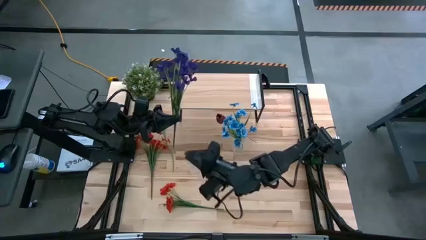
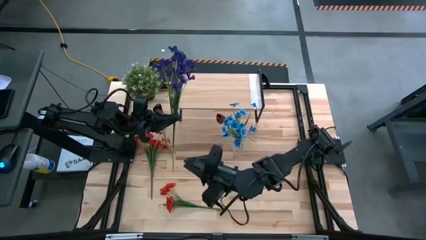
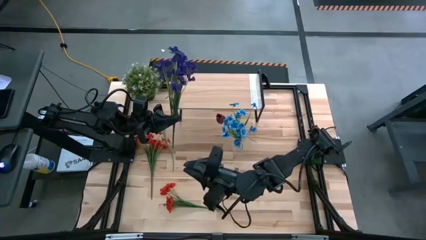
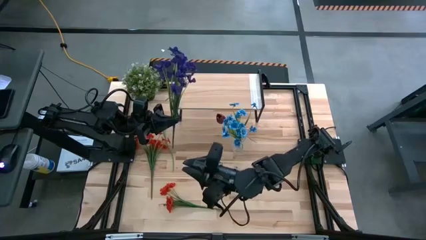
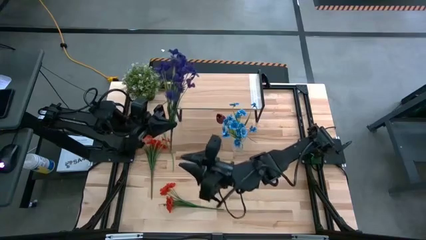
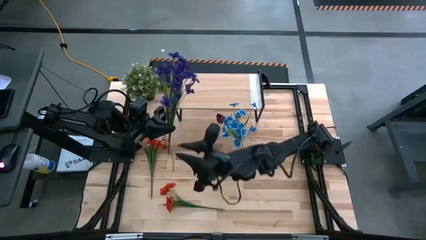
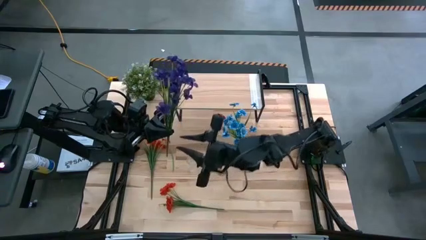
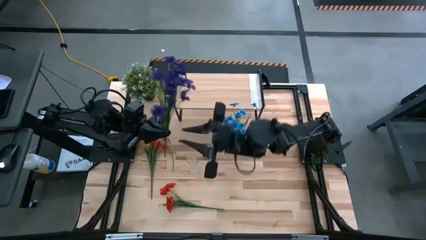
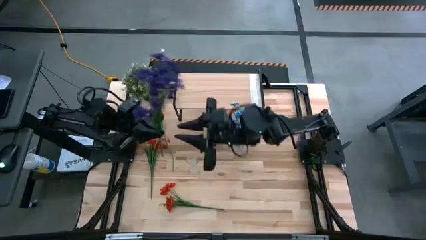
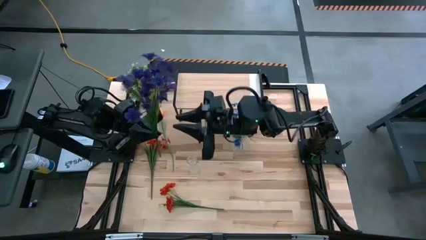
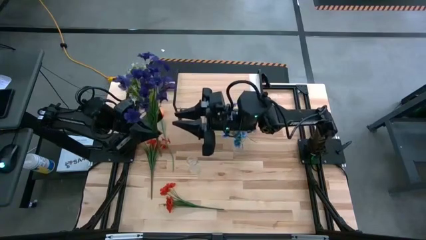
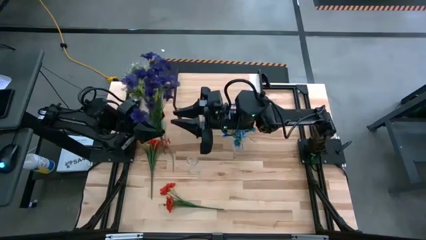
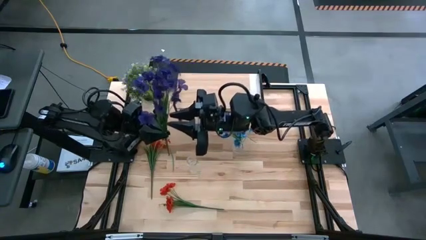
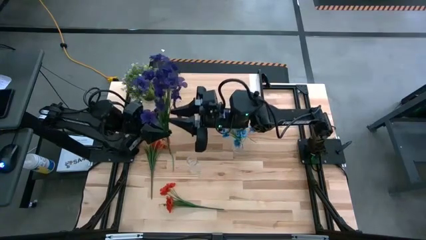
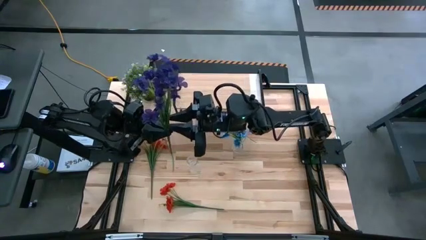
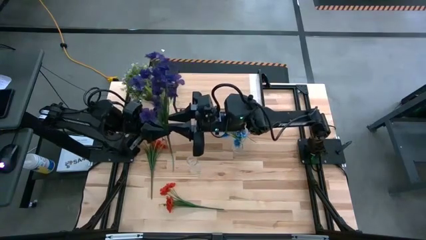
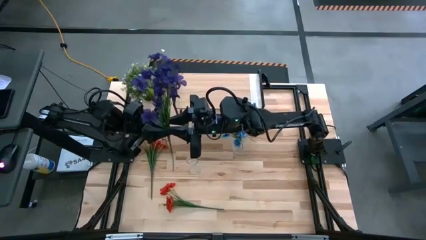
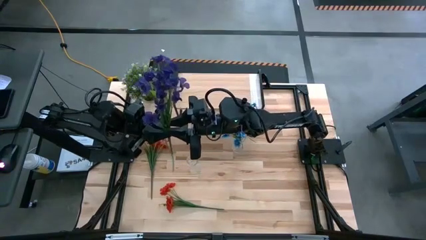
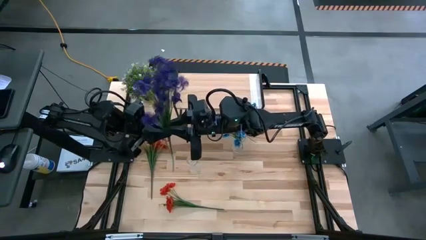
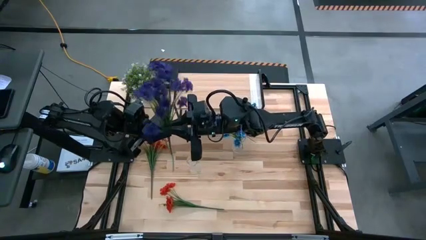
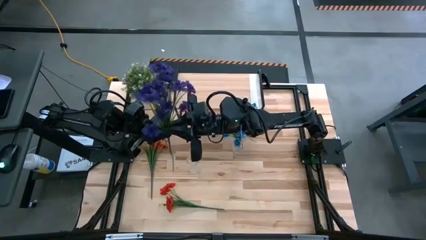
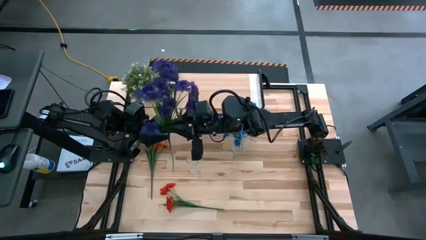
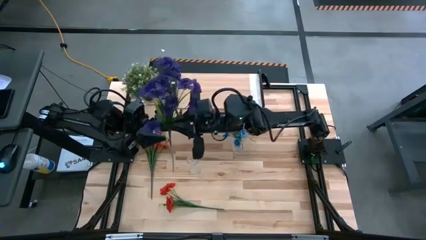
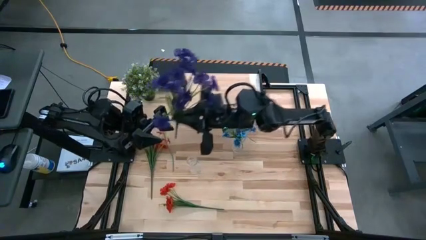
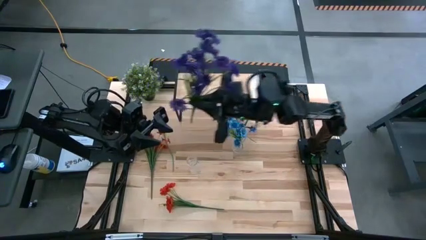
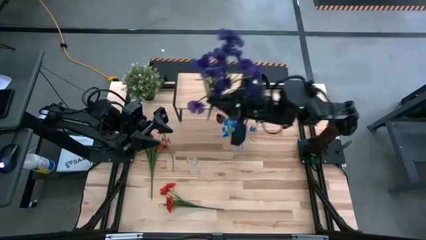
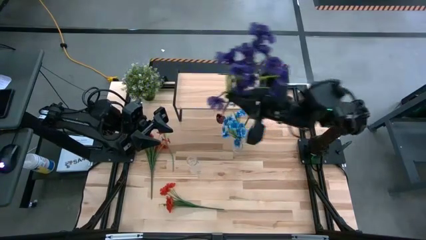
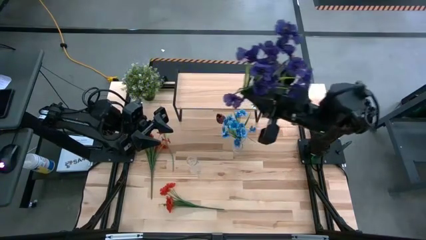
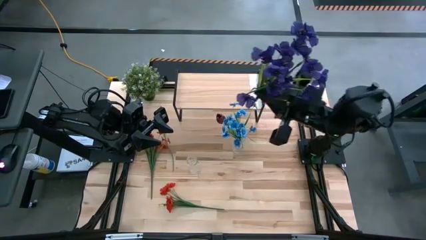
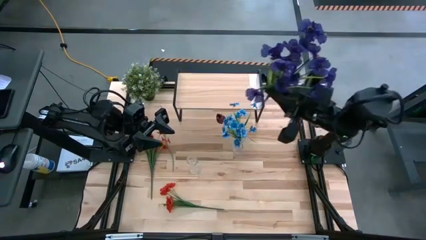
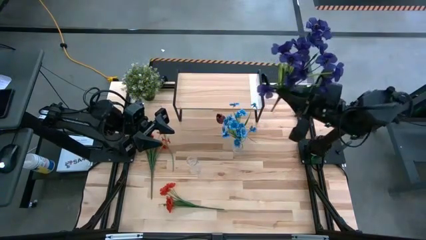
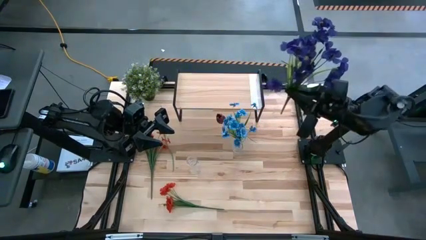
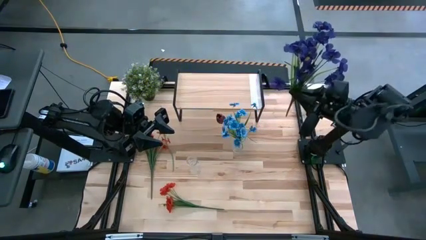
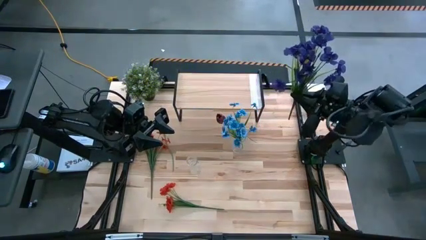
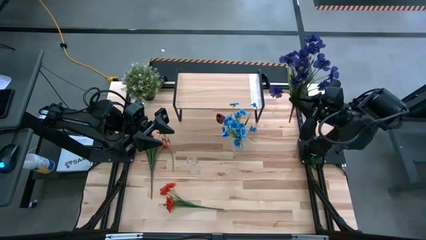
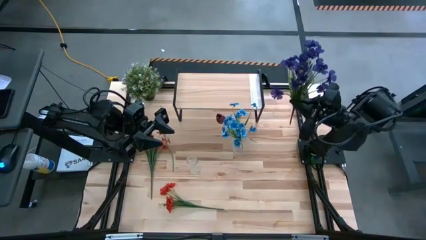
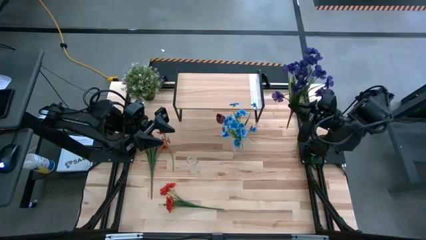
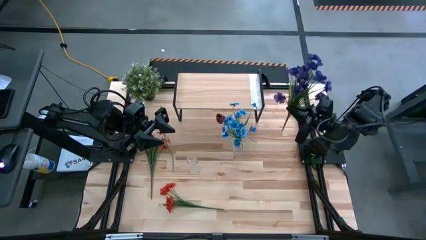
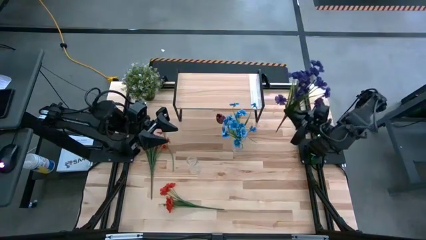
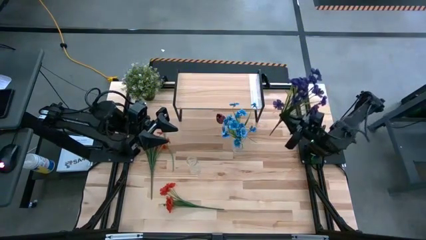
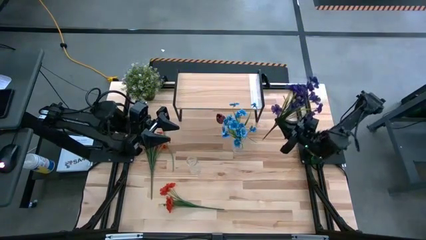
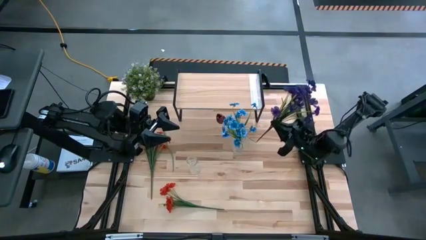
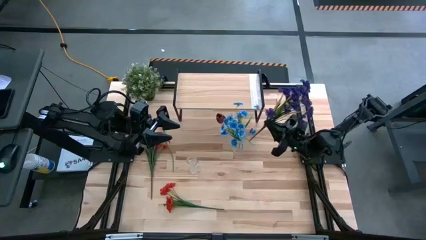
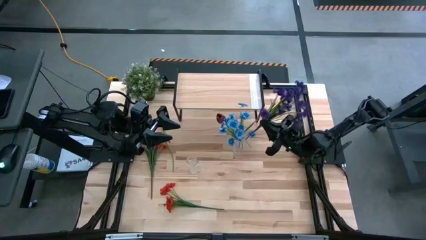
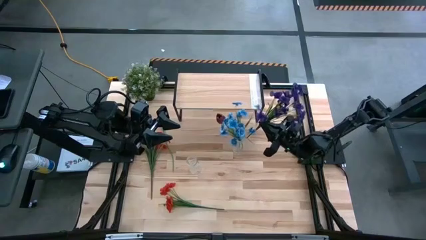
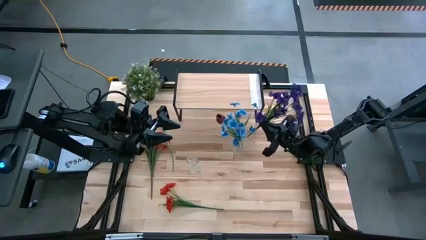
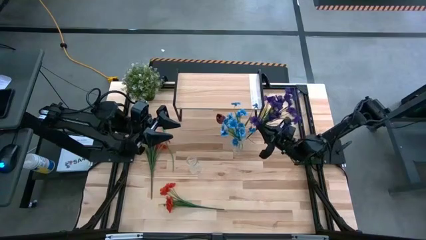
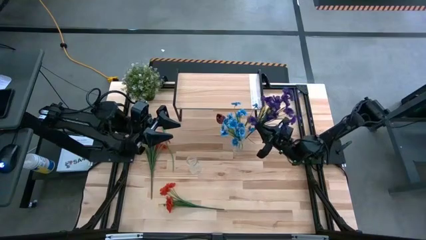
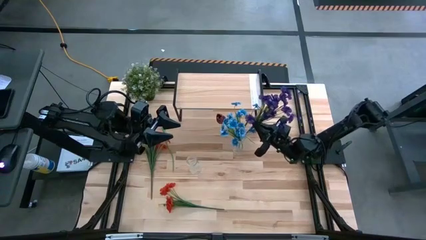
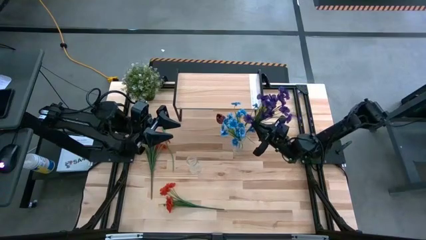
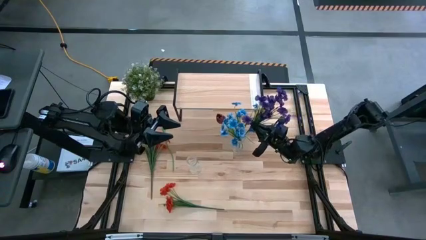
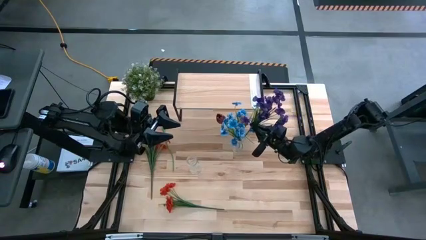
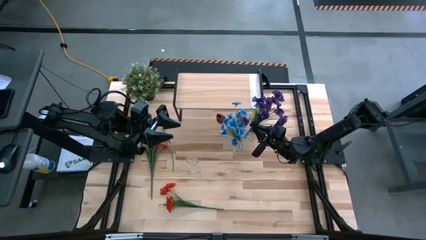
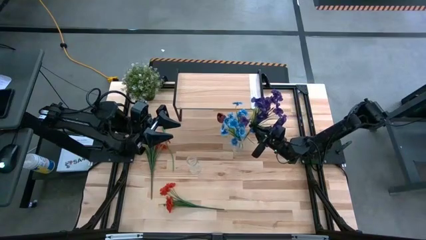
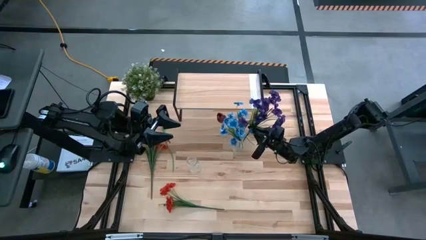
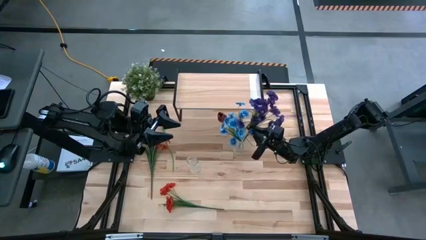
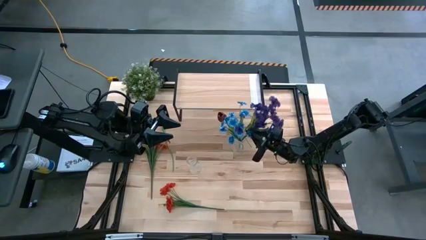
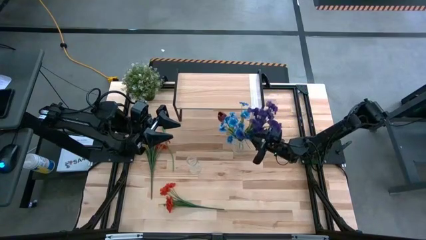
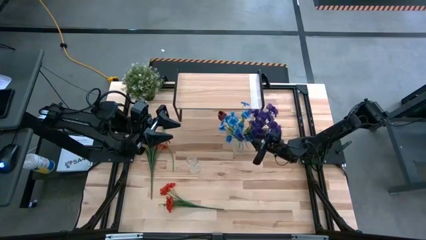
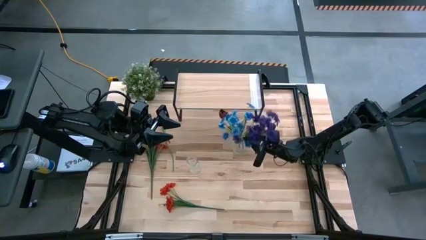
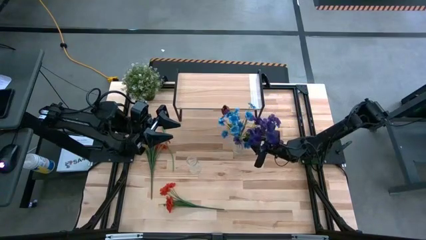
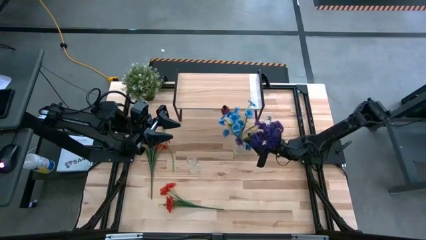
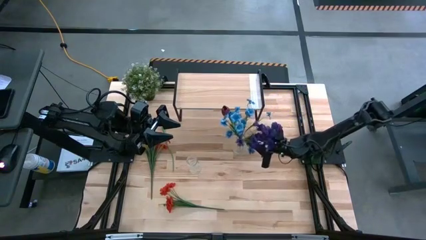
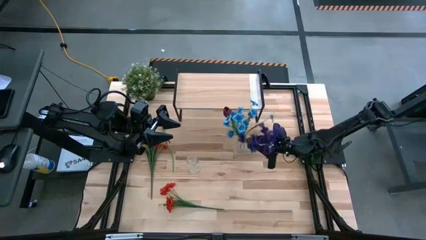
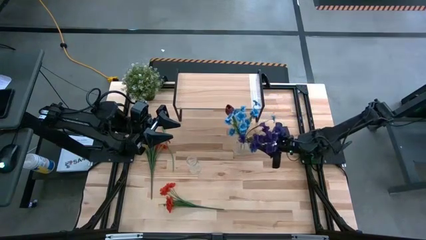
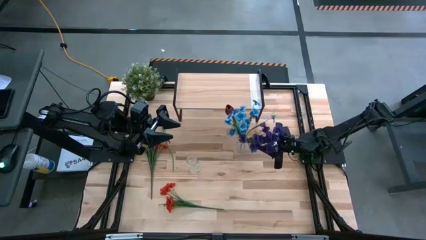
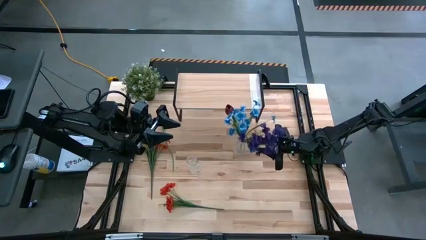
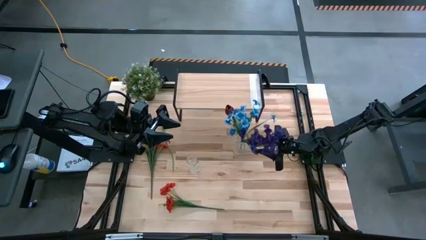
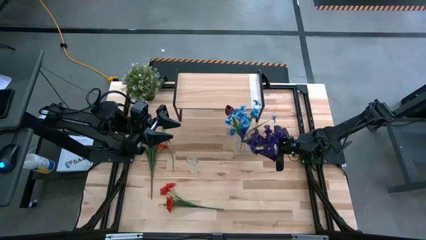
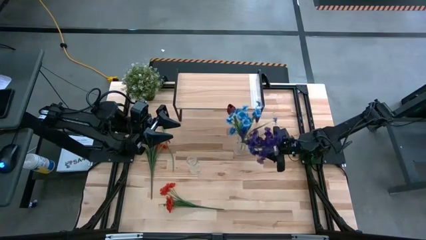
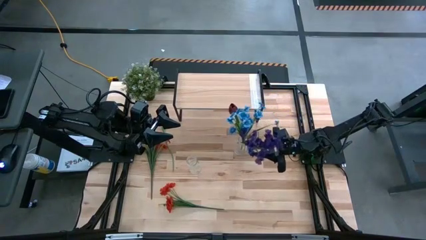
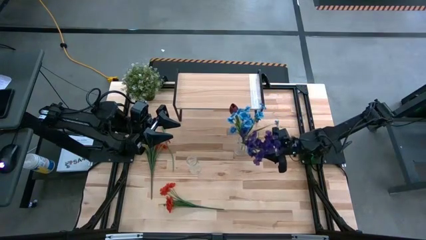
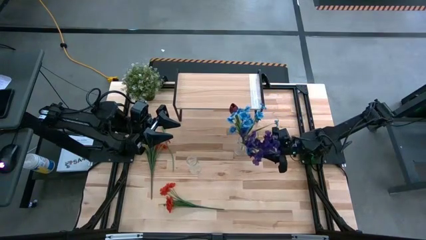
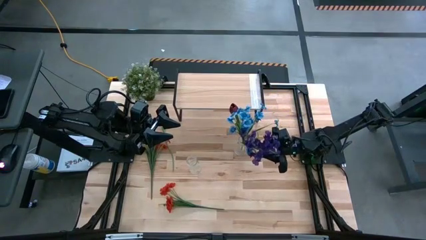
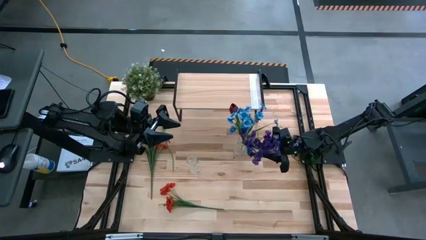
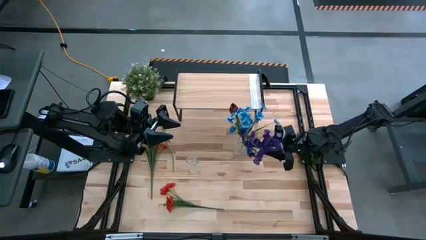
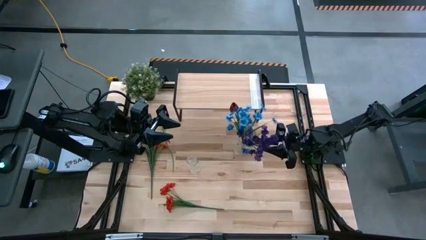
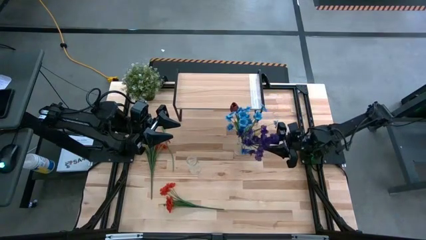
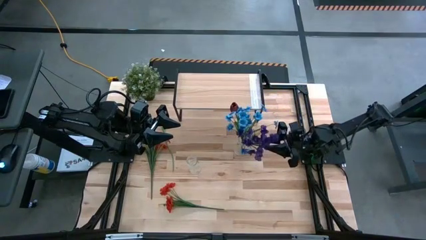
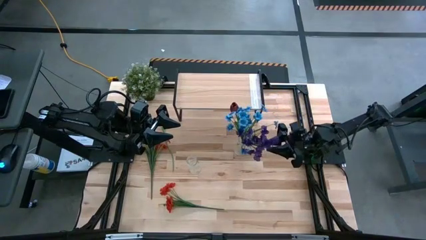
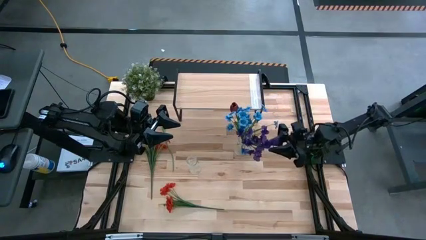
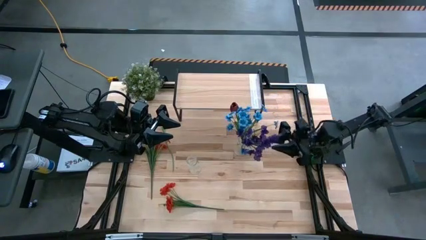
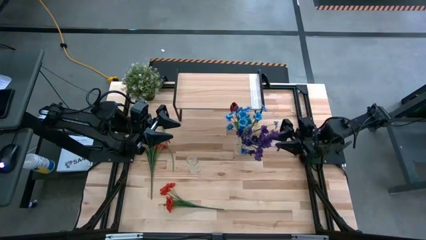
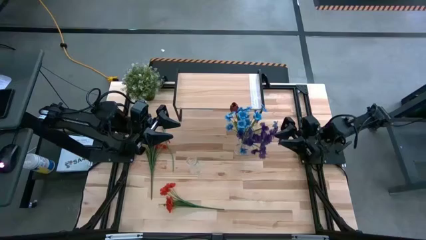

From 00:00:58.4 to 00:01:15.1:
Task: Pick and place flowers into a vace then onto a shelf
Put the purple flower into the right transparent vase
